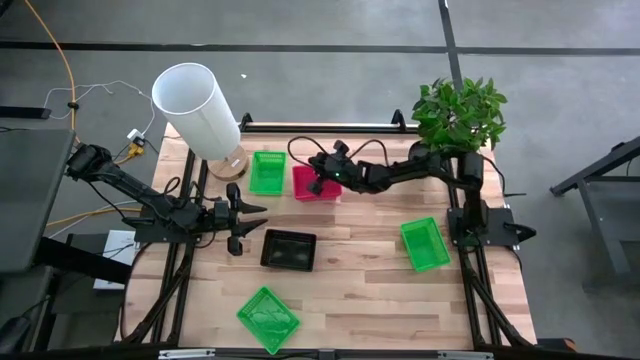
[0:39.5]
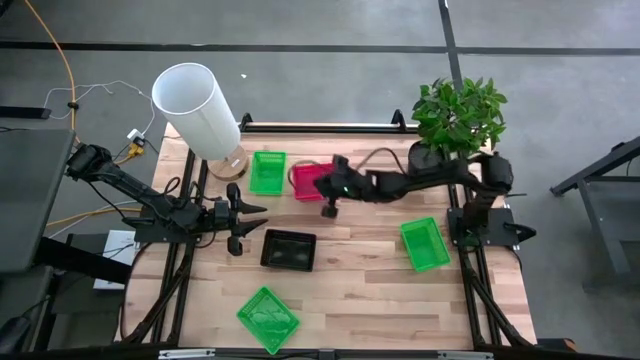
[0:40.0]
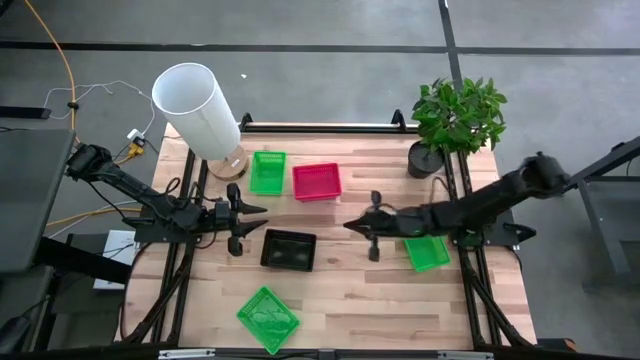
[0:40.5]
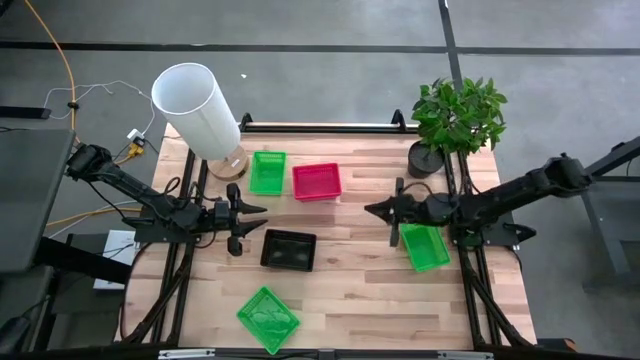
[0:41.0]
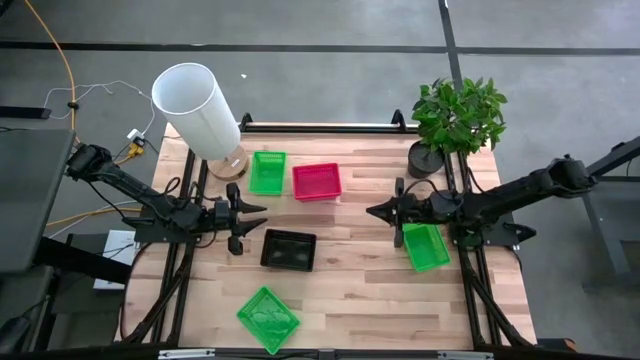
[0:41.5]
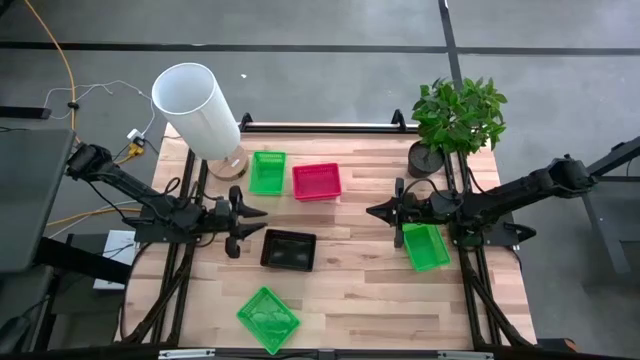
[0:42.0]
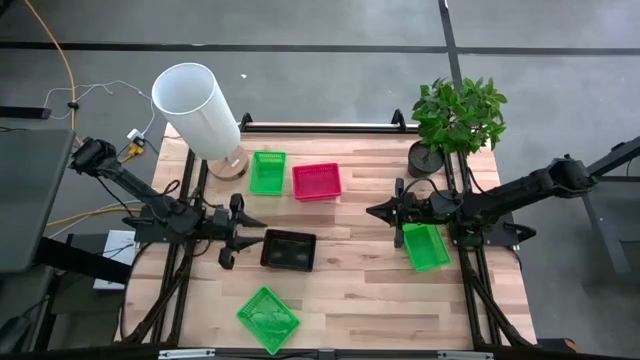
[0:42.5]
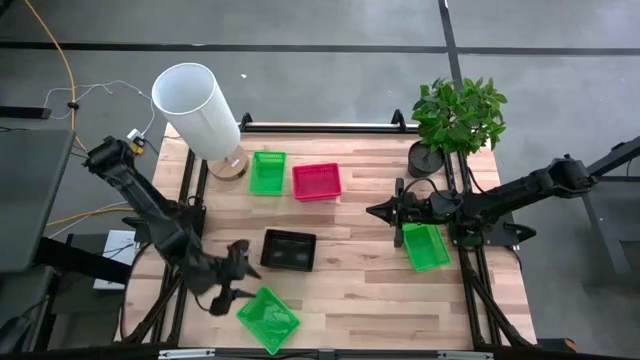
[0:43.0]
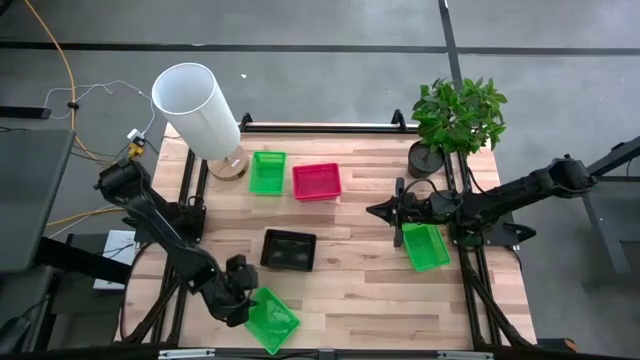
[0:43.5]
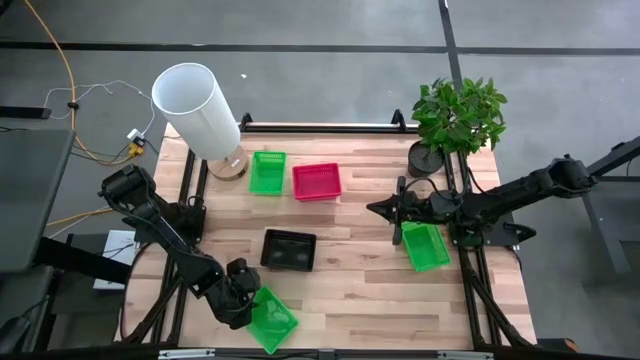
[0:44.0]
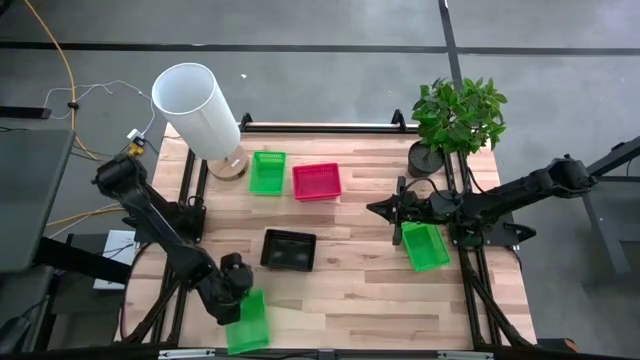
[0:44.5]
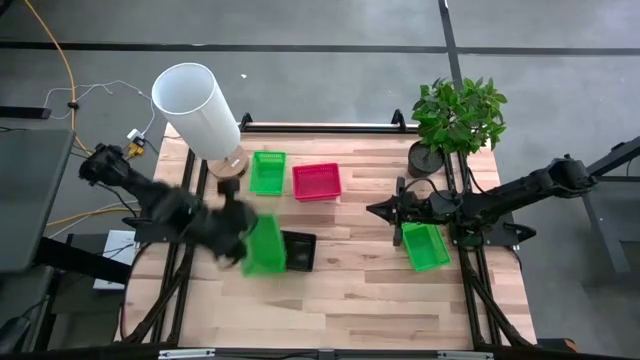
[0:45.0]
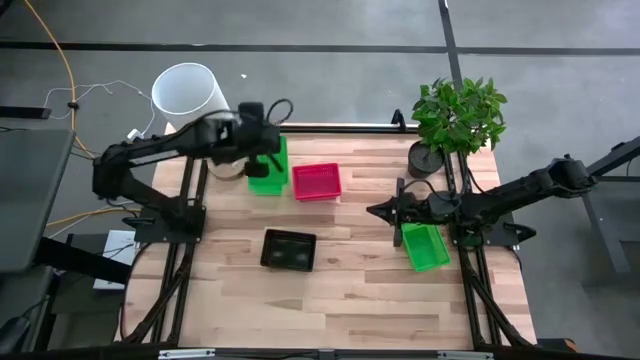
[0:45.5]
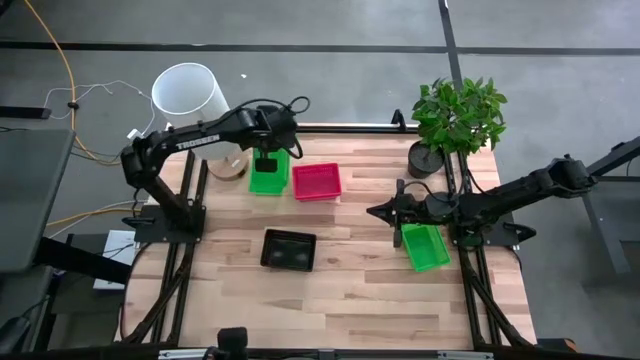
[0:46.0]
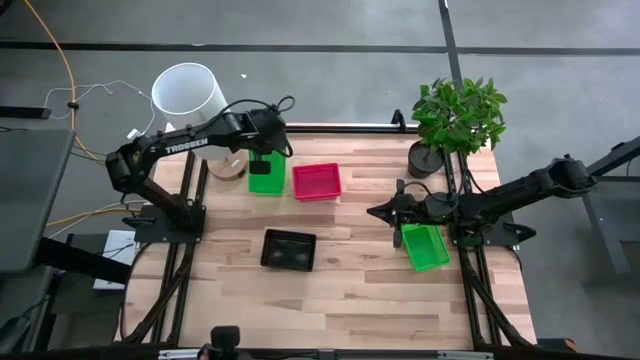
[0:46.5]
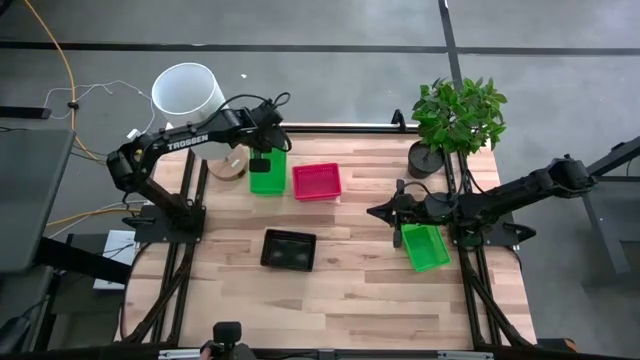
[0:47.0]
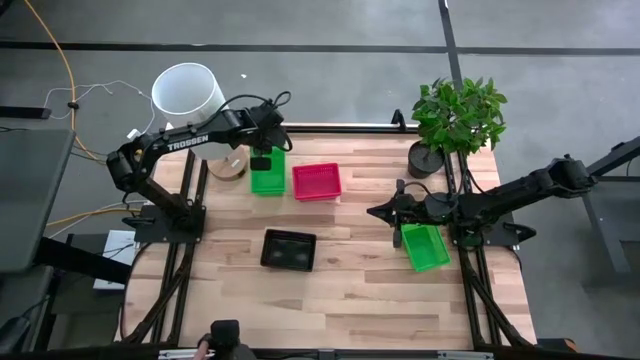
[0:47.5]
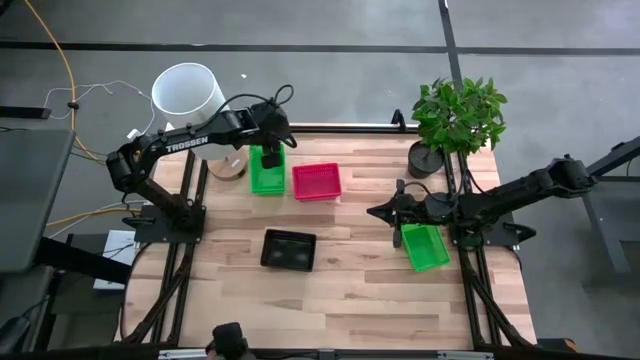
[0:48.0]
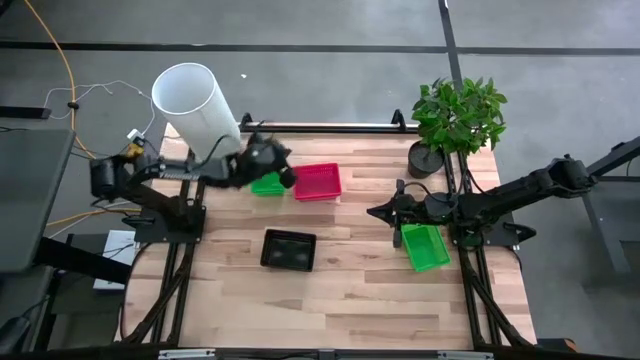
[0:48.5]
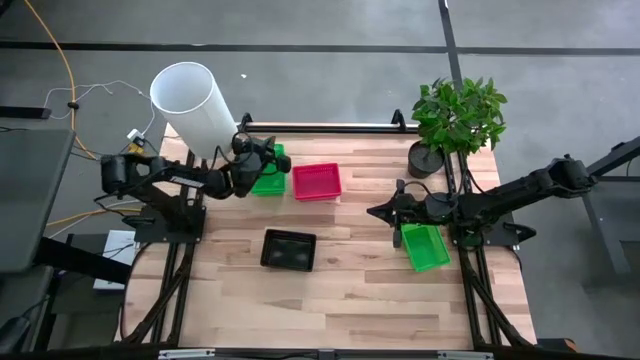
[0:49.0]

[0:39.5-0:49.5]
Stack the bottom green bin on the top green bin

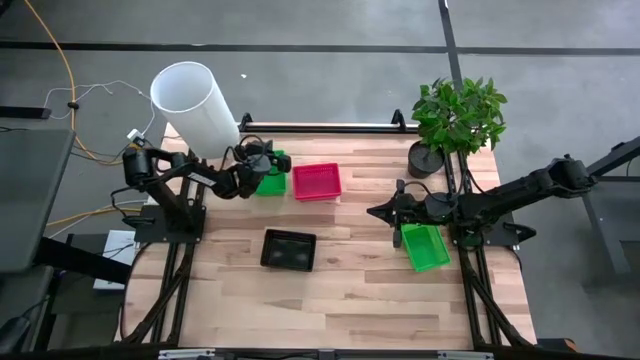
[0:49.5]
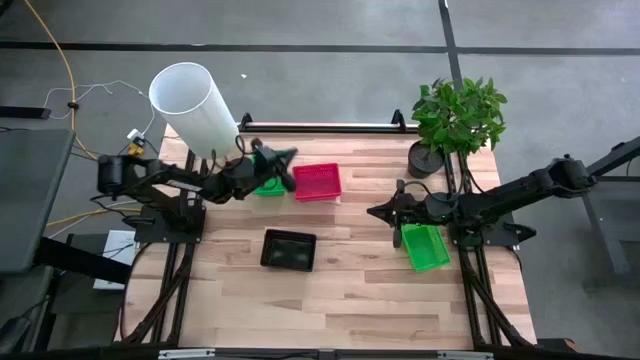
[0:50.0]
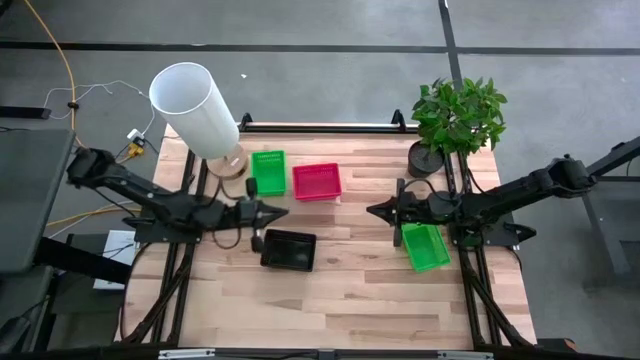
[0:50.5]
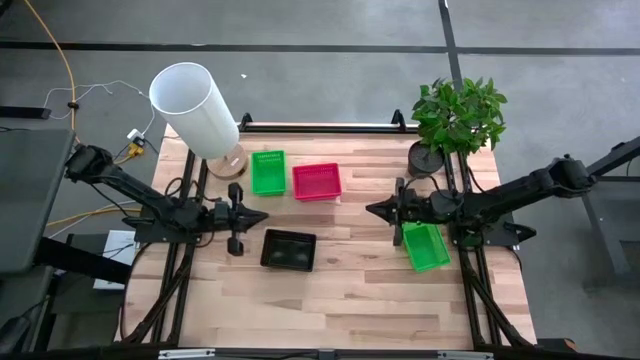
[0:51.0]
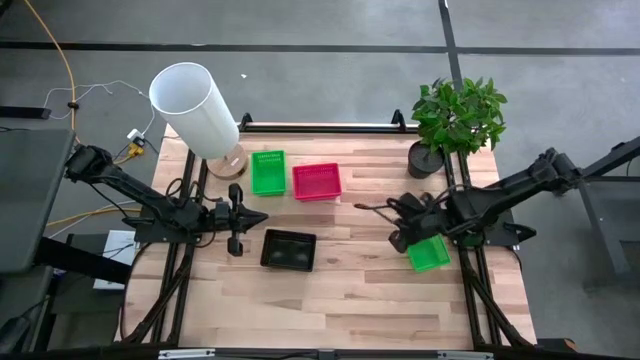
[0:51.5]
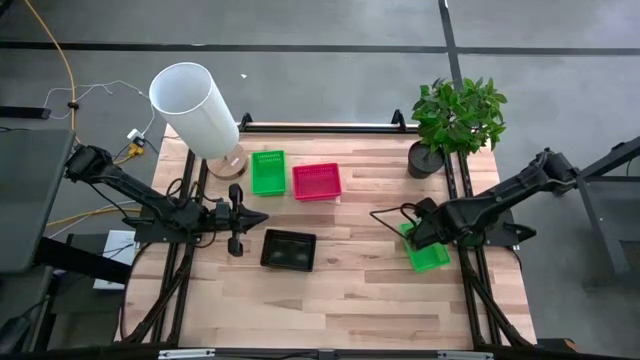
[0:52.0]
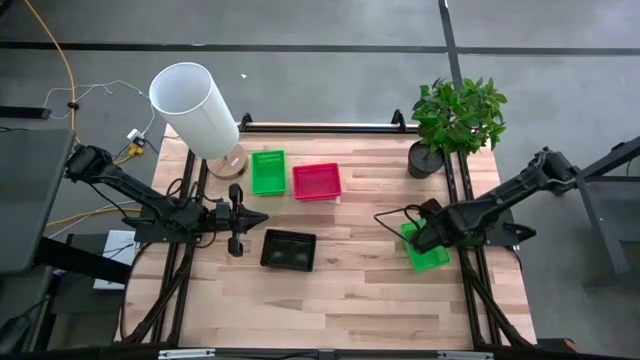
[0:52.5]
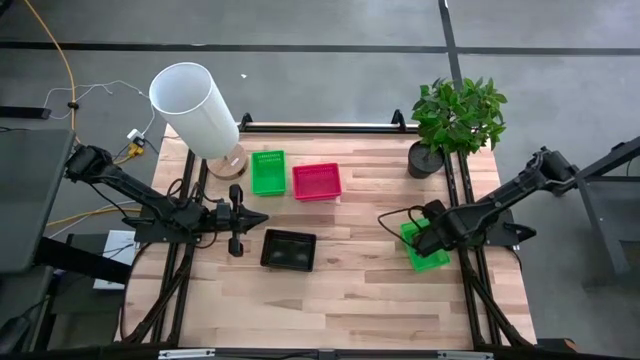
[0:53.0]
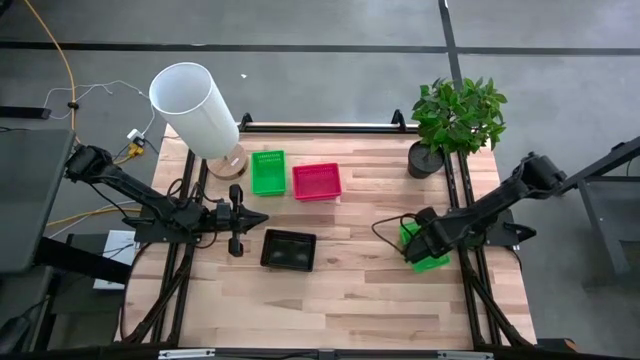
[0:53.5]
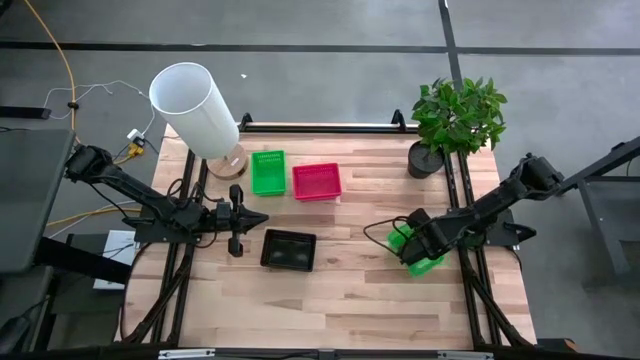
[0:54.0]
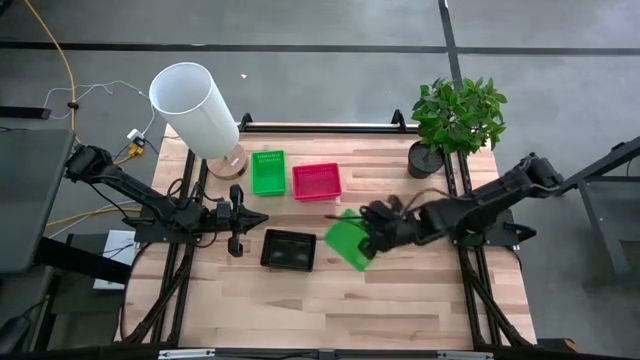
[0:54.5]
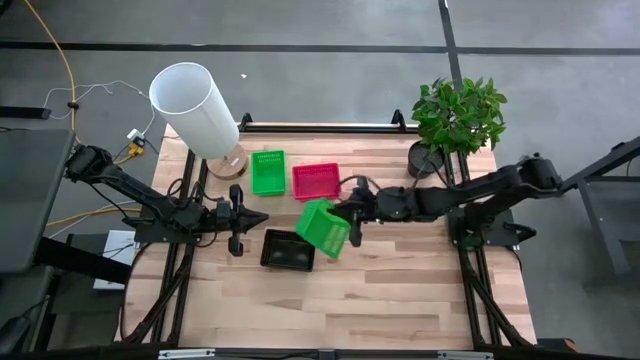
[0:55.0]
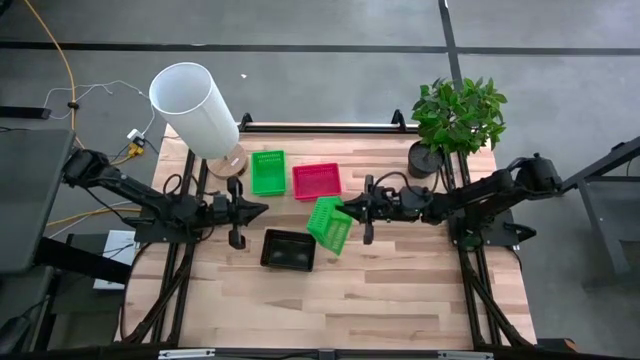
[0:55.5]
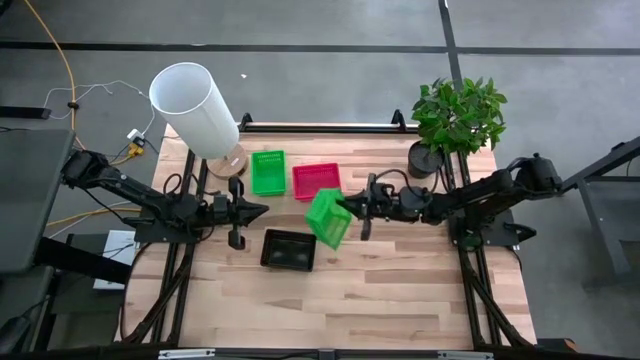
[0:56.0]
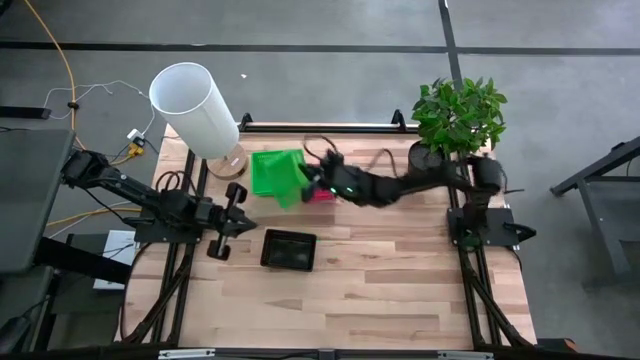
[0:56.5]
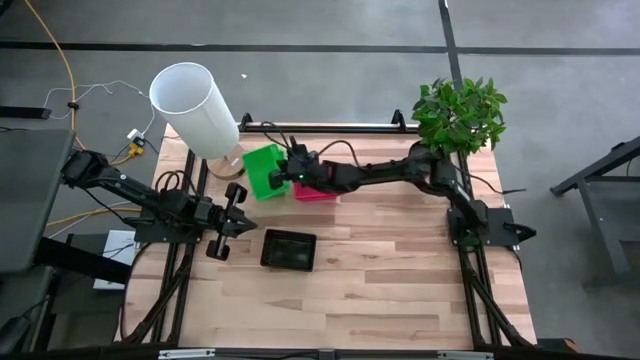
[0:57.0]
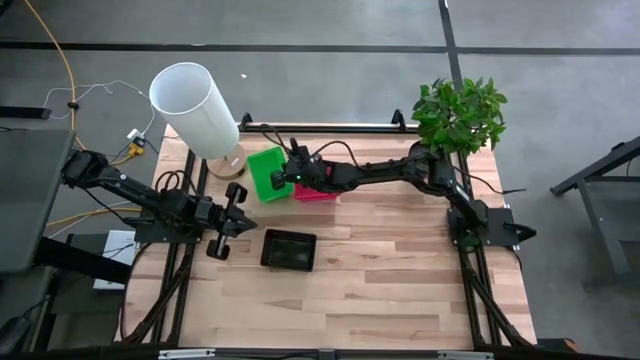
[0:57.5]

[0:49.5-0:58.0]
Stack the right green bin on the left green bin

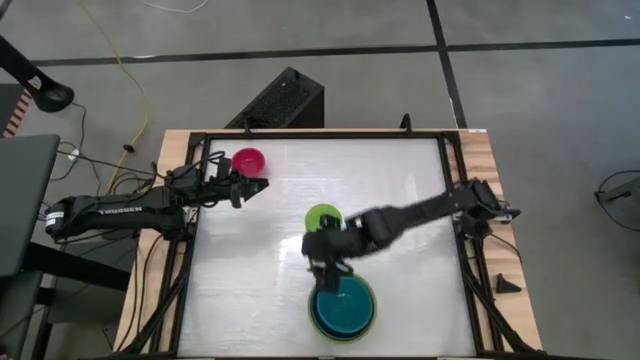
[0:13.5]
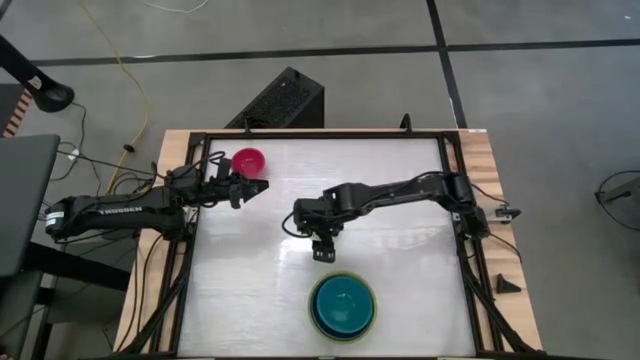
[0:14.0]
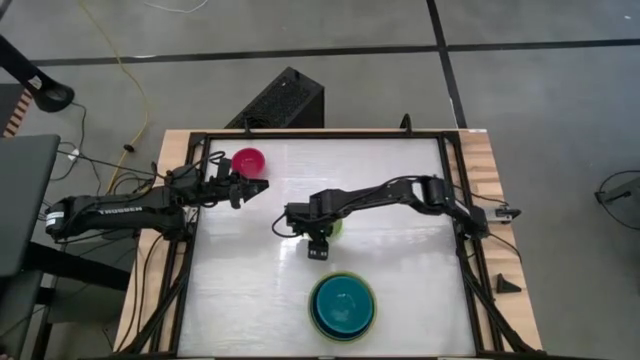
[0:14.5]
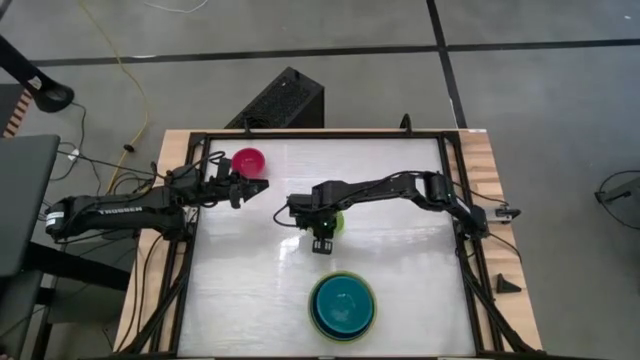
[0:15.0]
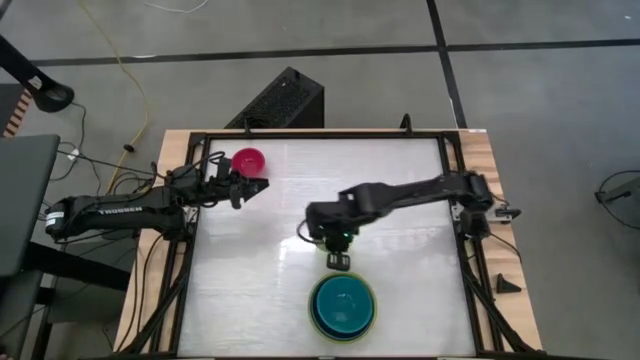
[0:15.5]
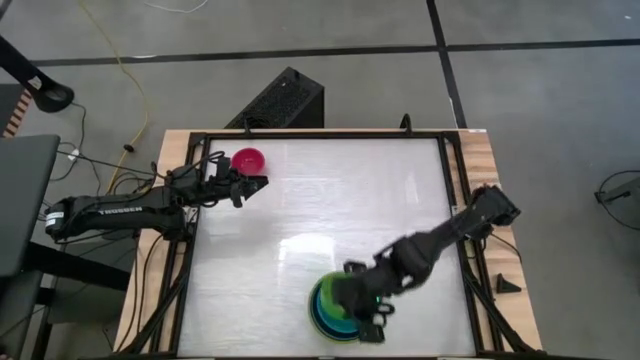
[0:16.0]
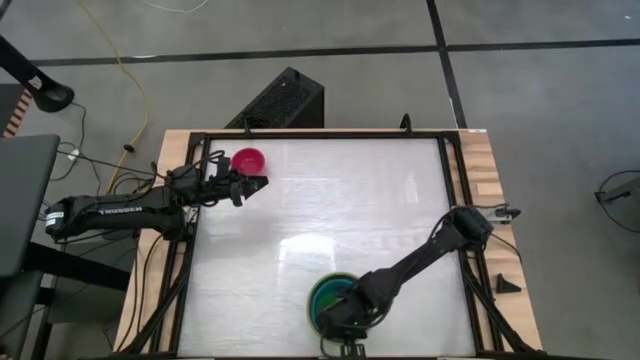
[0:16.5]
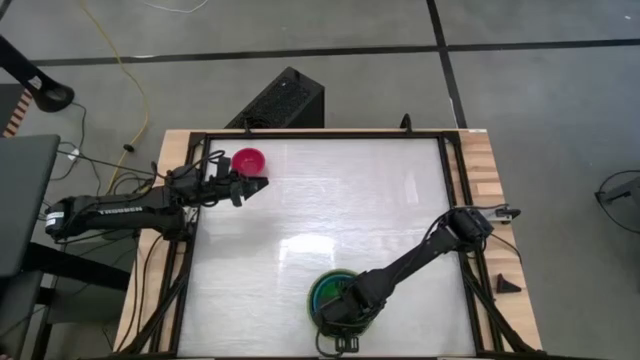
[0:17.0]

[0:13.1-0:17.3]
Stack the green bowl into the blue bowl
